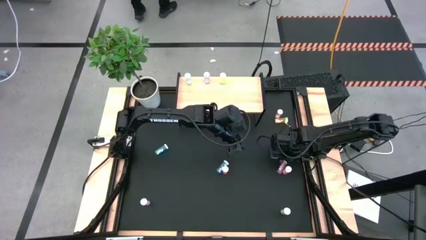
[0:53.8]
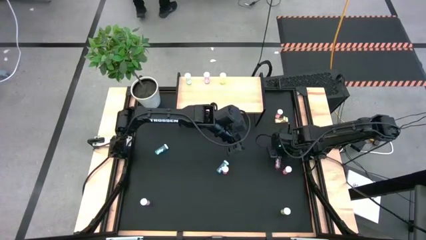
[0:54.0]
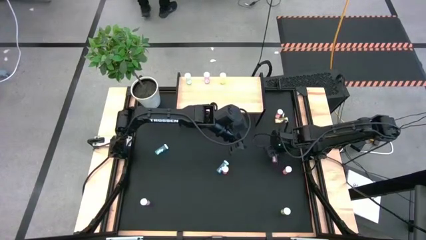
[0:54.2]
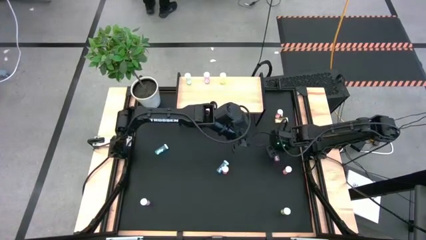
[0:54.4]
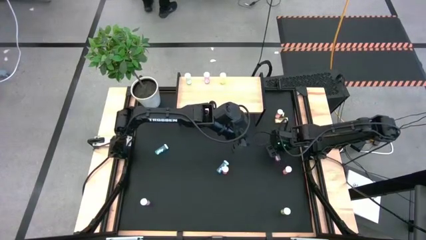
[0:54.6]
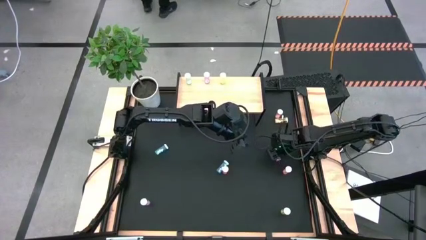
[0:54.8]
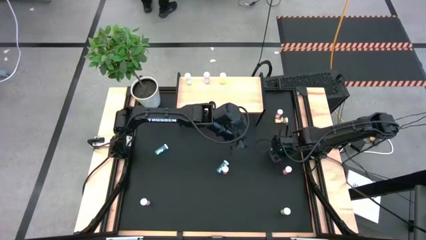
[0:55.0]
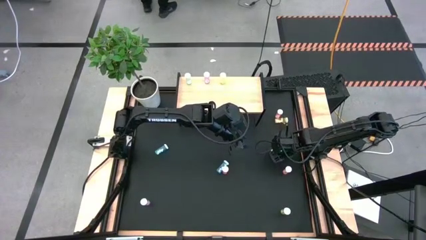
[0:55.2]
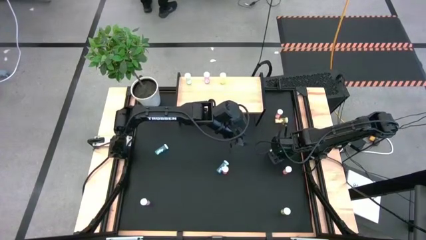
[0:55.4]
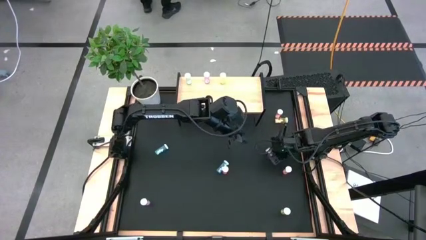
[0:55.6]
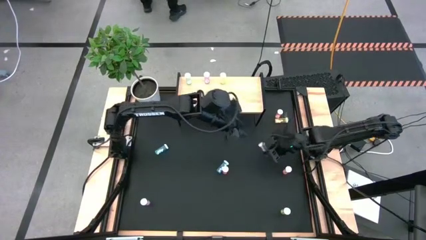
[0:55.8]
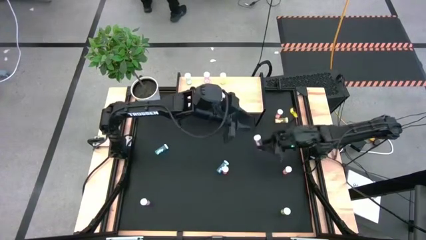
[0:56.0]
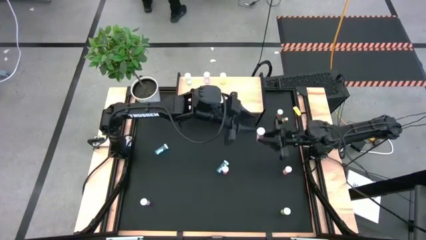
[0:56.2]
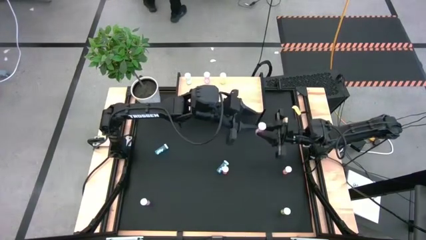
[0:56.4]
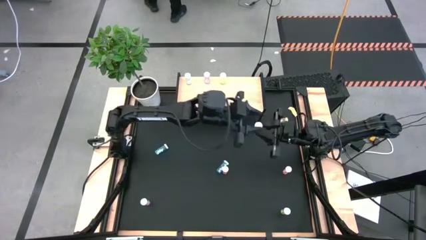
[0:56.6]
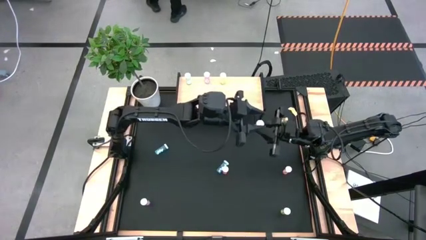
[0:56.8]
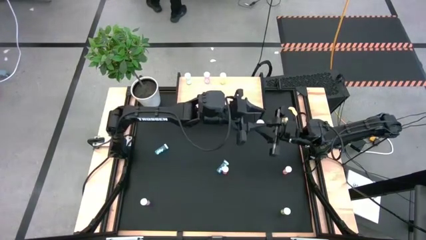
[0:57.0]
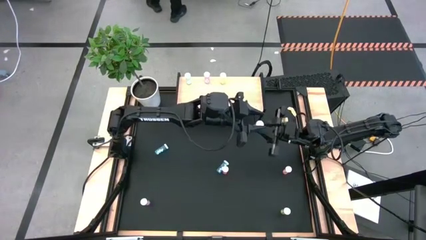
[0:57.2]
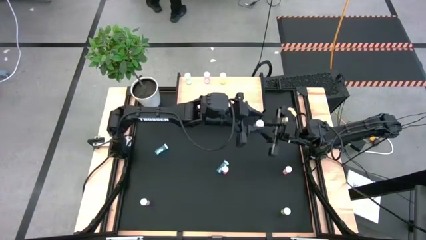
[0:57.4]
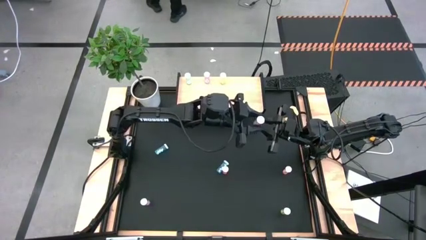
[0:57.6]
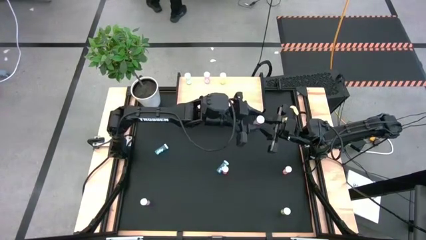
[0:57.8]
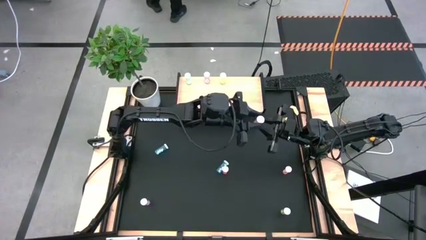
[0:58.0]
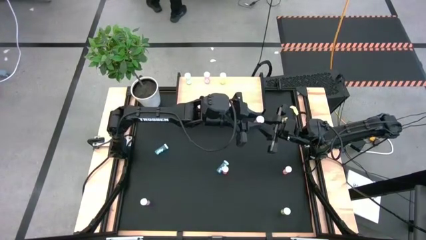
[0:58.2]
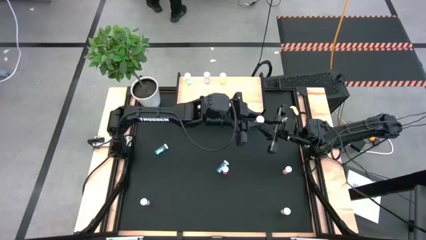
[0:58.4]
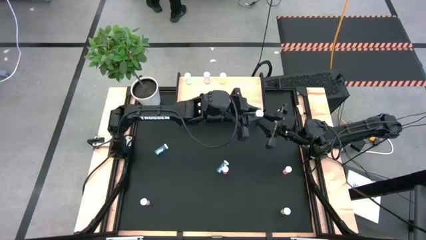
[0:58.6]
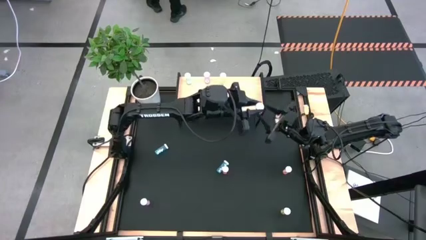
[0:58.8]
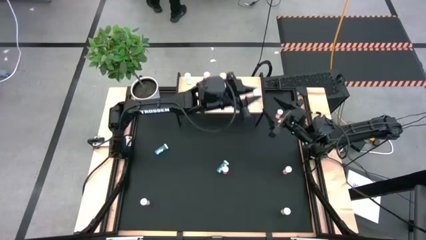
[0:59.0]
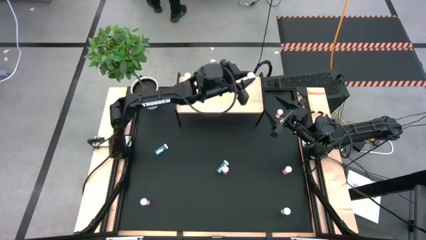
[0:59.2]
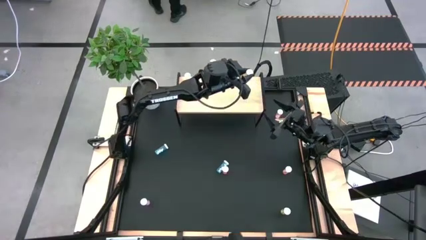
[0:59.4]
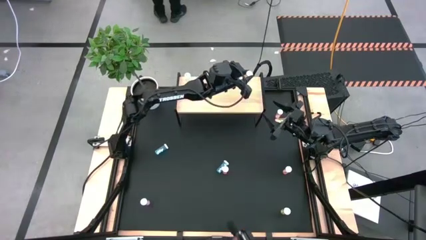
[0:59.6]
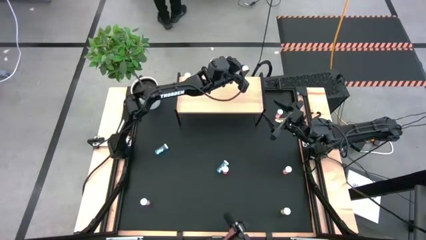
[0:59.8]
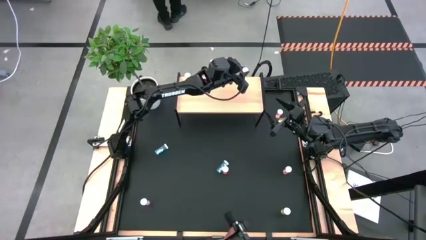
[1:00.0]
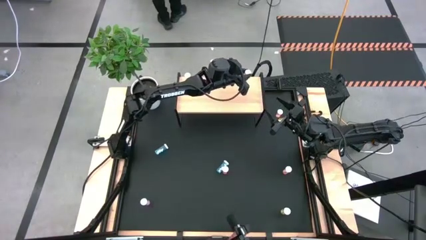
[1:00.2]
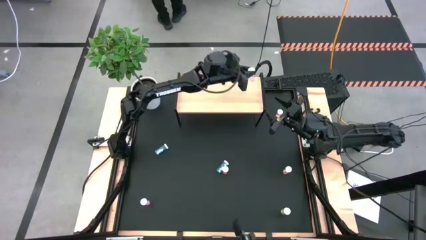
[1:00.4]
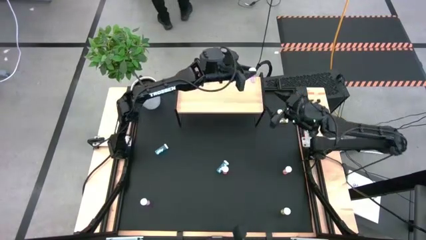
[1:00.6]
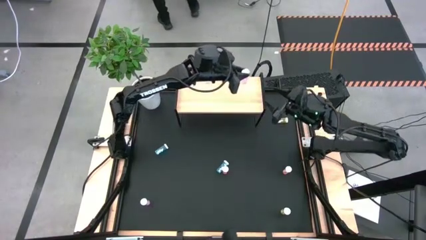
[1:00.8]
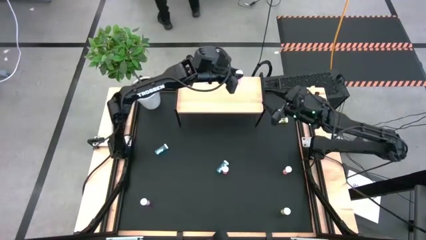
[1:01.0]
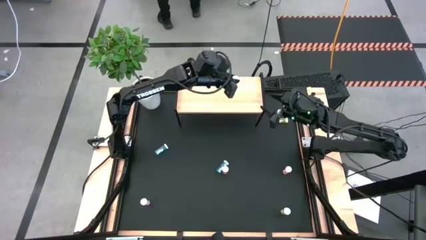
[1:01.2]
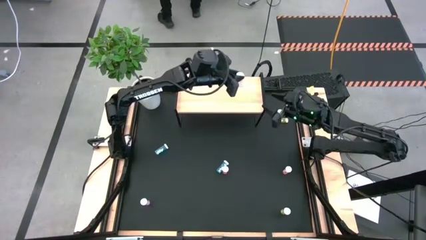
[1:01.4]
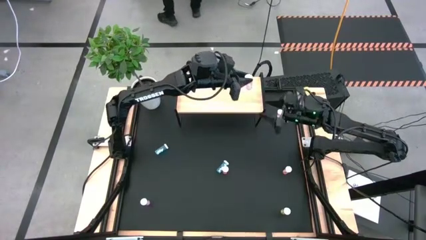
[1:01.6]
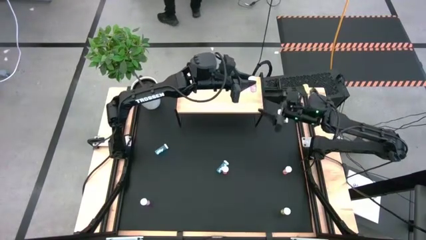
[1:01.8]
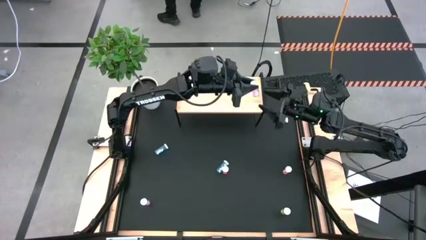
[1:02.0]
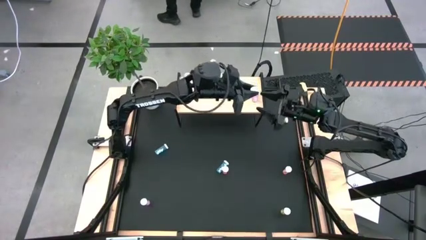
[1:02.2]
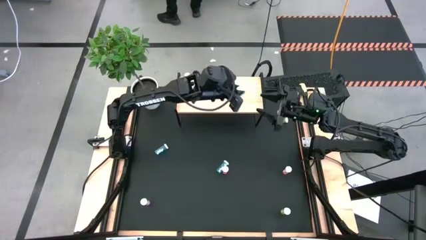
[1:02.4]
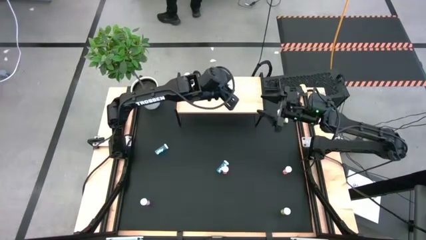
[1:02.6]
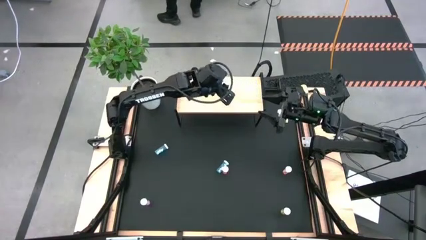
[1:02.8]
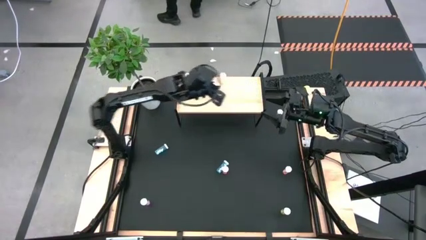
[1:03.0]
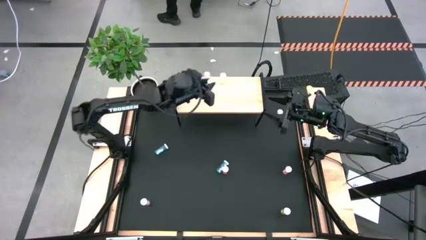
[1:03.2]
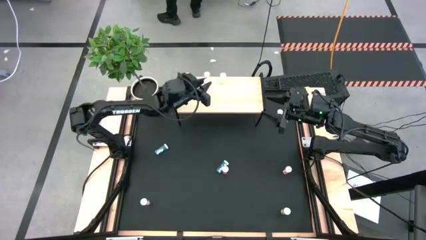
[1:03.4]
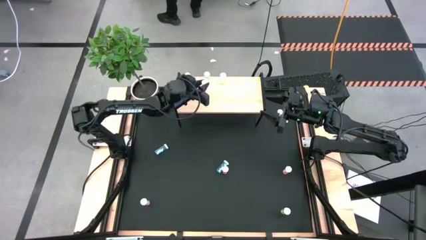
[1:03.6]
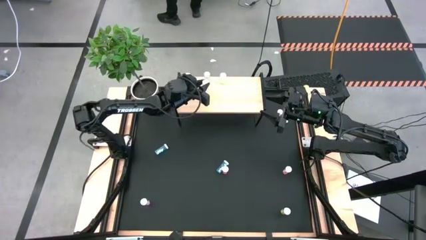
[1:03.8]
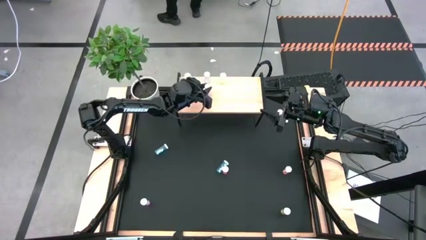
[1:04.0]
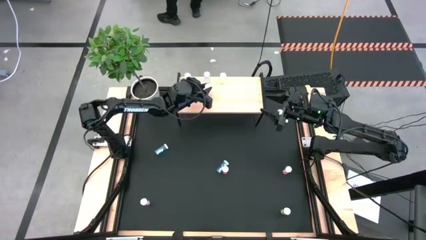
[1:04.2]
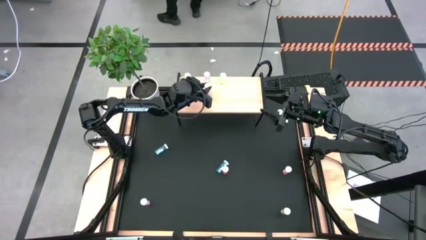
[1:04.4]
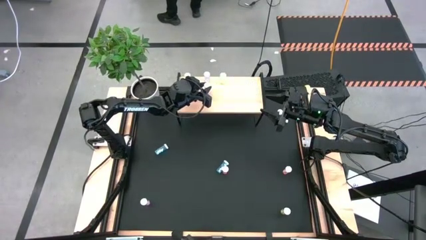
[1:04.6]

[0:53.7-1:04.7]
Task: Pick and place medicine bottles onto shelf by color
Put the right pink pill bottle on the shelf aligned with the other pink bottle
